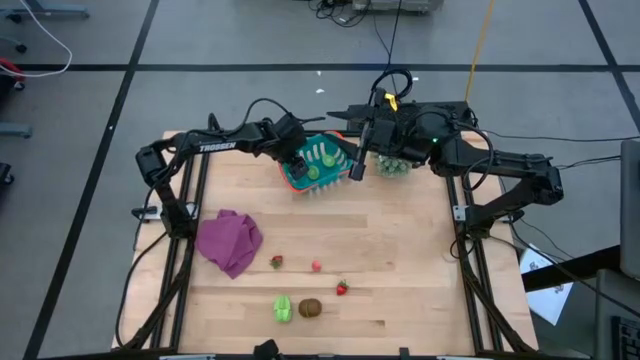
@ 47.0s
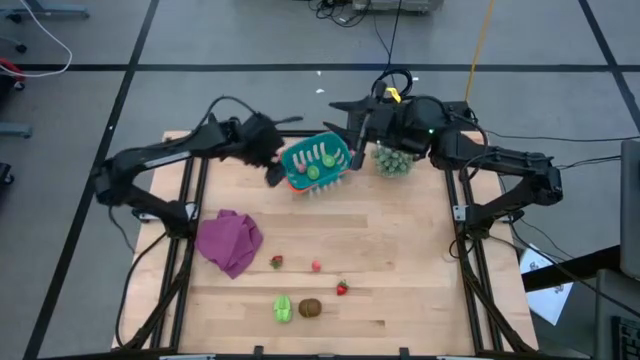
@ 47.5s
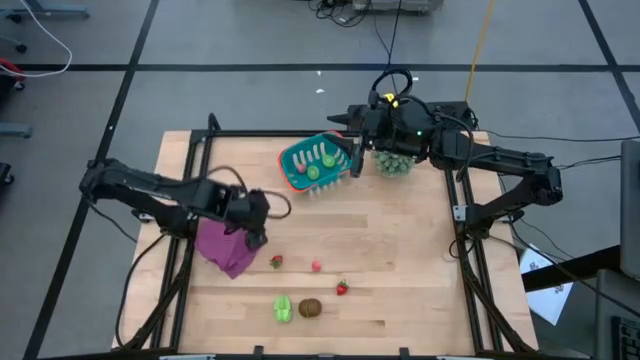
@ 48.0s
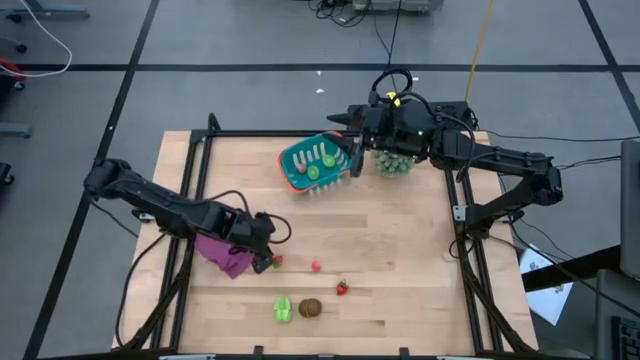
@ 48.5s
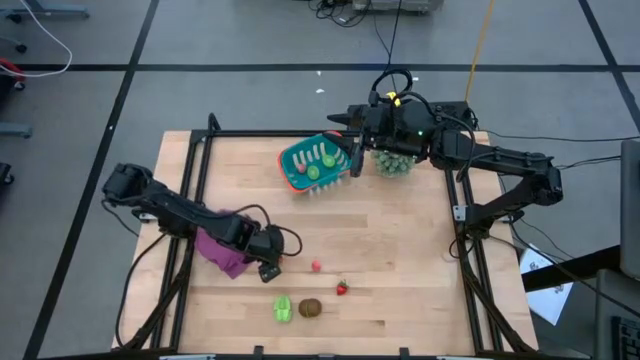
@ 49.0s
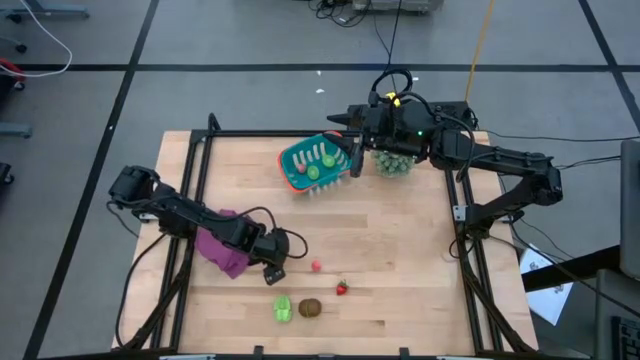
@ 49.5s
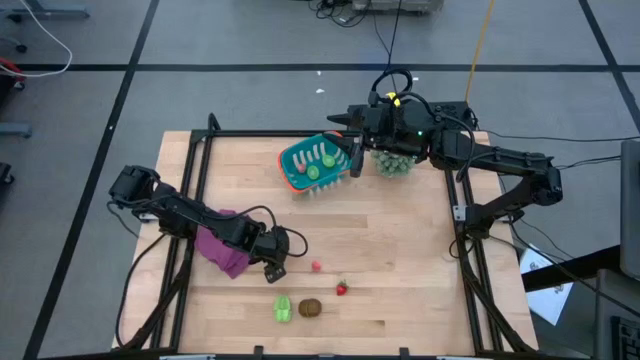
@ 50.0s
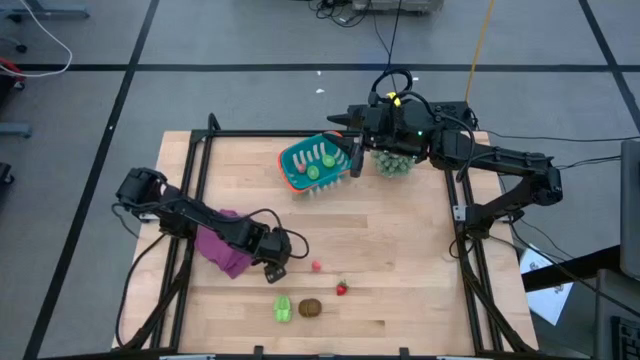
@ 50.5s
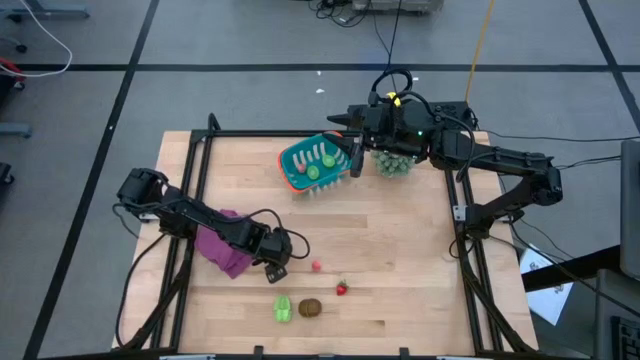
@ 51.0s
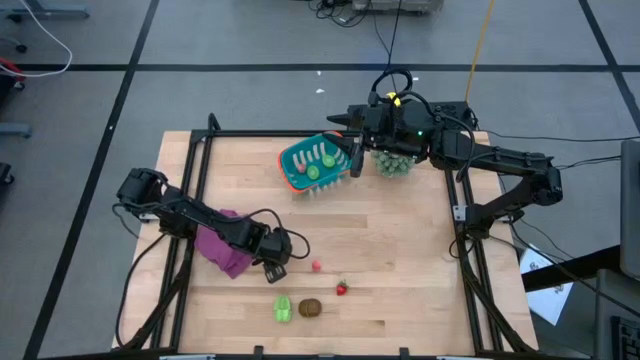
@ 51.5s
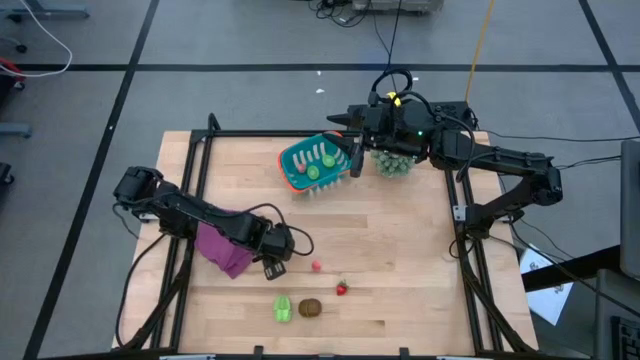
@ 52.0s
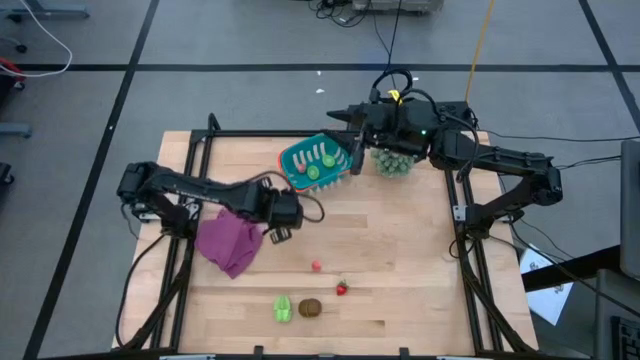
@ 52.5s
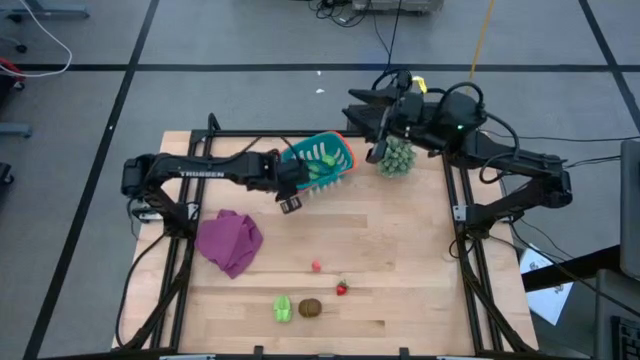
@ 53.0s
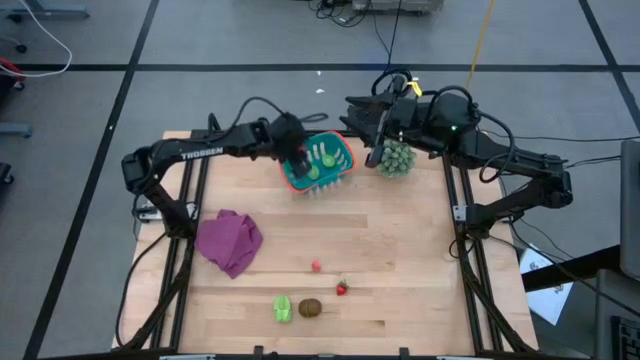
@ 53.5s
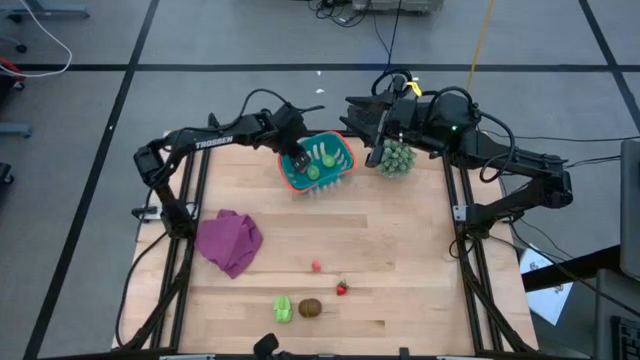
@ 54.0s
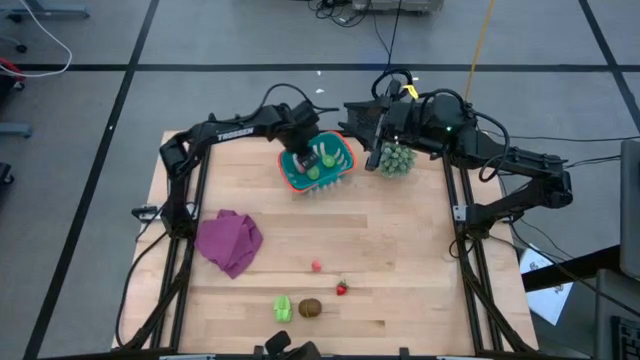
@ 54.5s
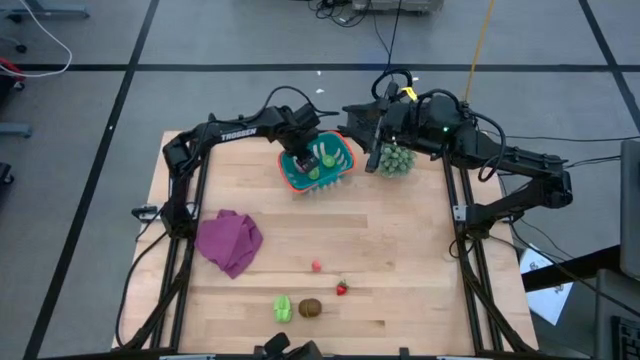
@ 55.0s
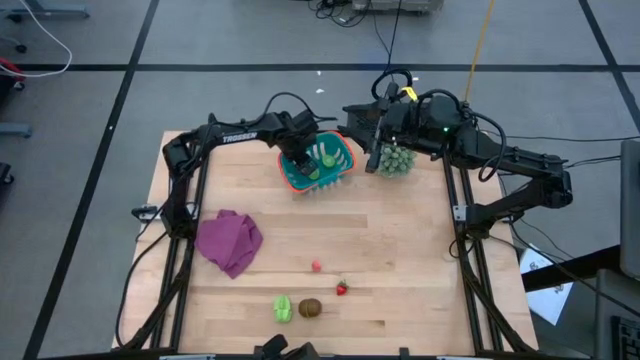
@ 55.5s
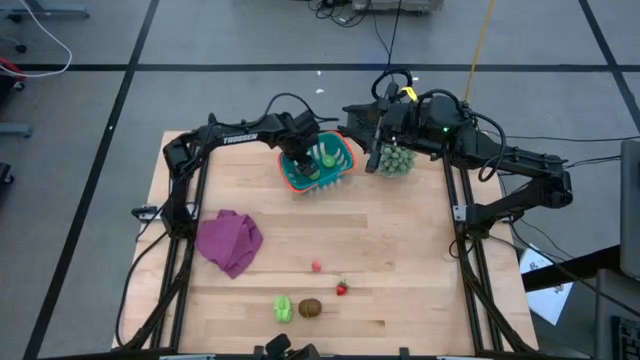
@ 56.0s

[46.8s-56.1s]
Task: Pick and placing Produce into tupperware
Put the left strawberry into the blue basket

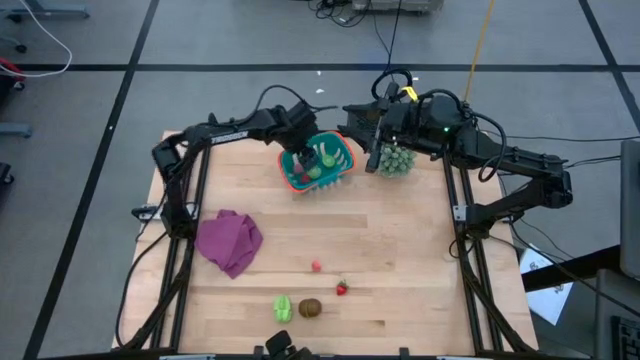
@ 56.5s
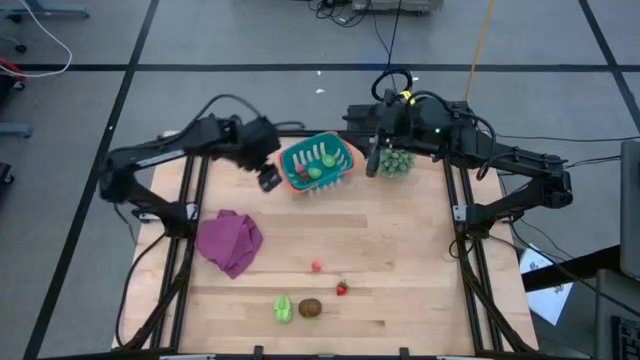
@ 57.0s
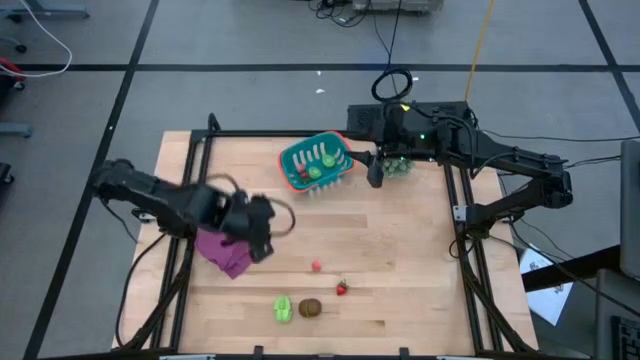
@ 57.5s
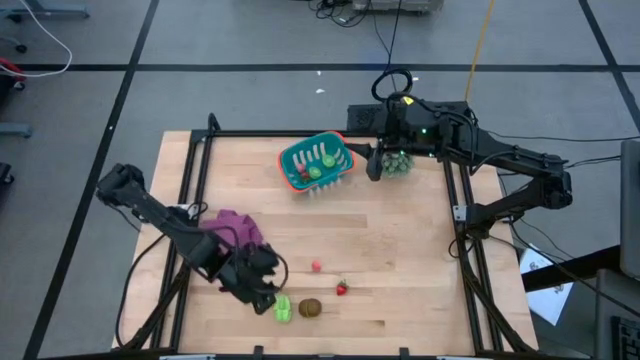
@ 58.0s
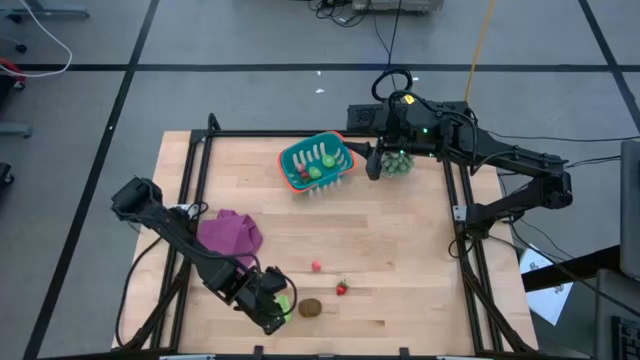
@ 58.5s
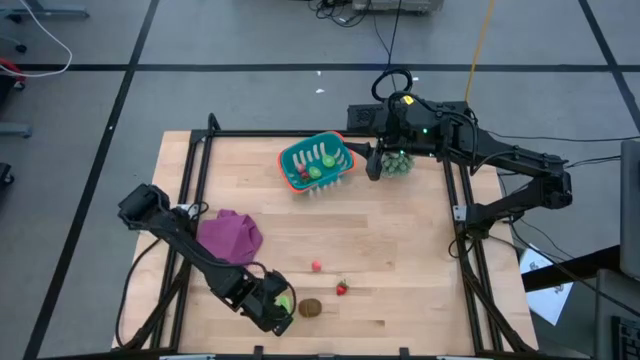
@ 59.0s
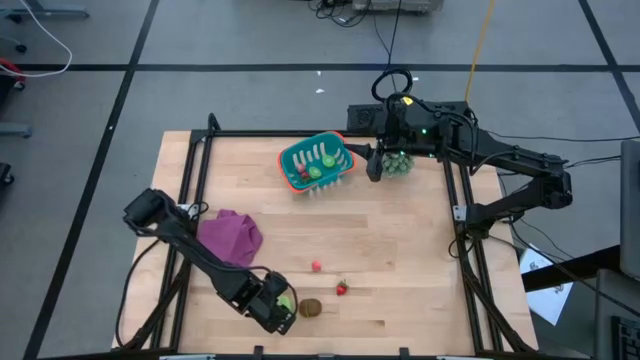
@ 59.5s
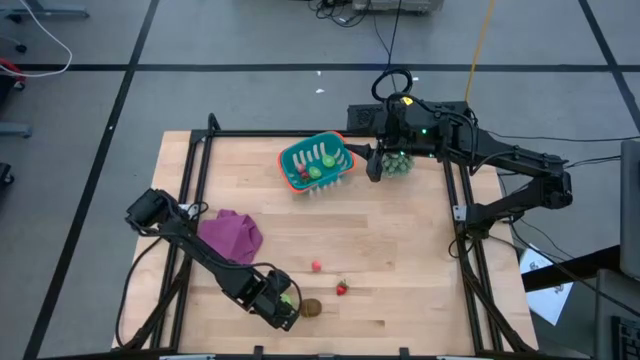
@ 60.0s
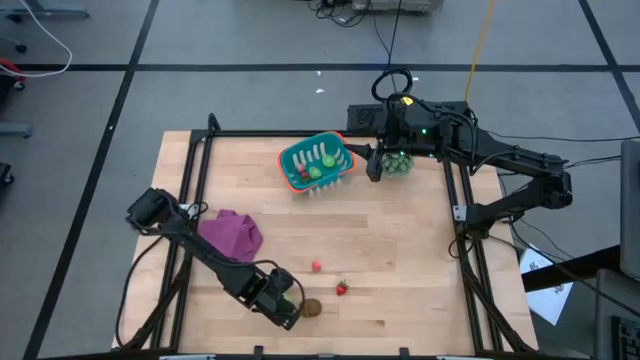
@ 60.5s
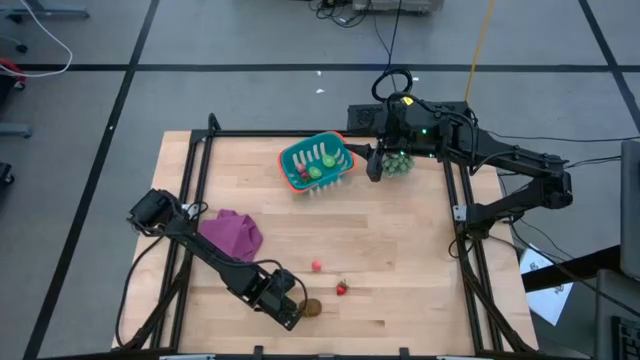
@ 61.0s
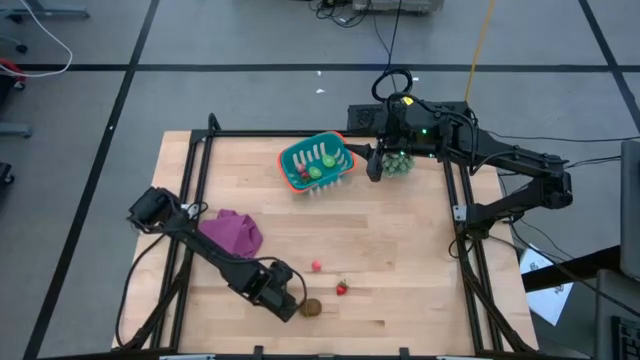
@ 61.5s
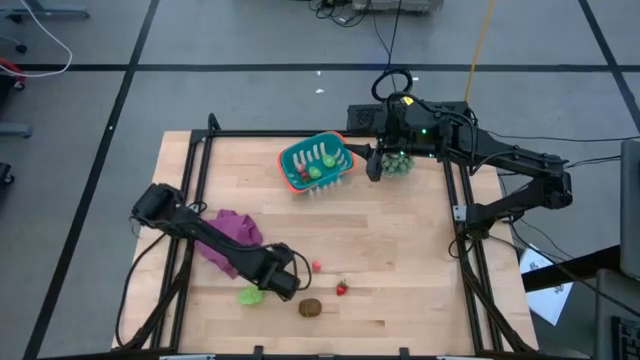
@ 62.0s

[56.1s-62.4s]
Put the star fruit into the blue basket

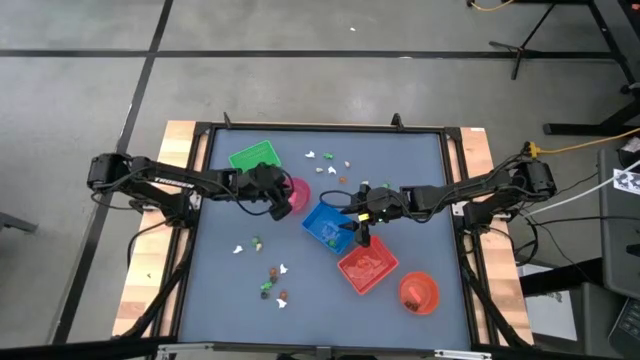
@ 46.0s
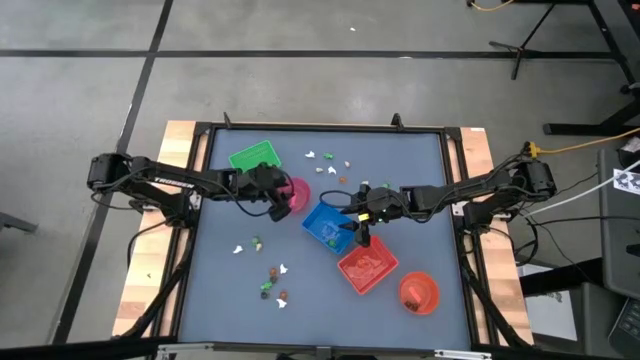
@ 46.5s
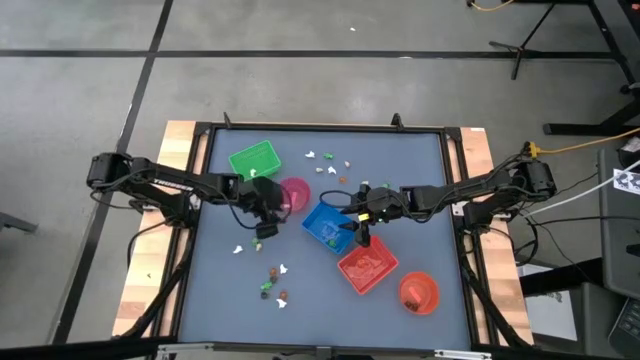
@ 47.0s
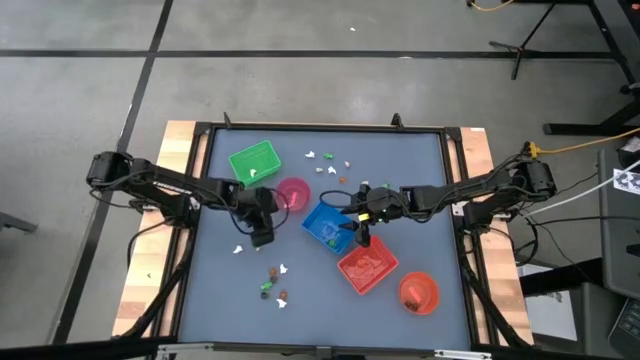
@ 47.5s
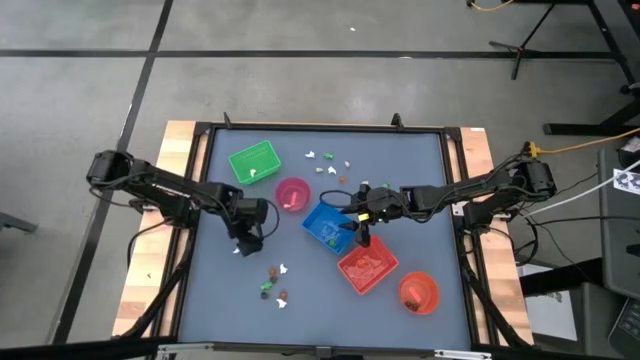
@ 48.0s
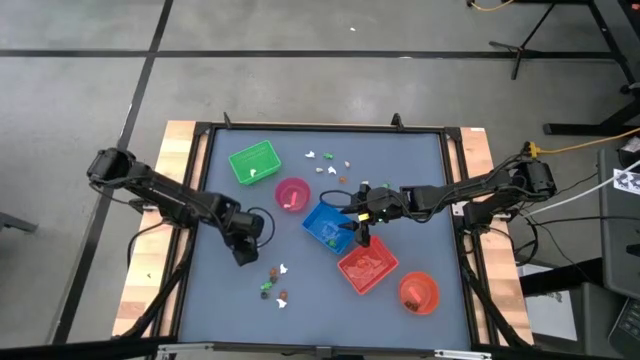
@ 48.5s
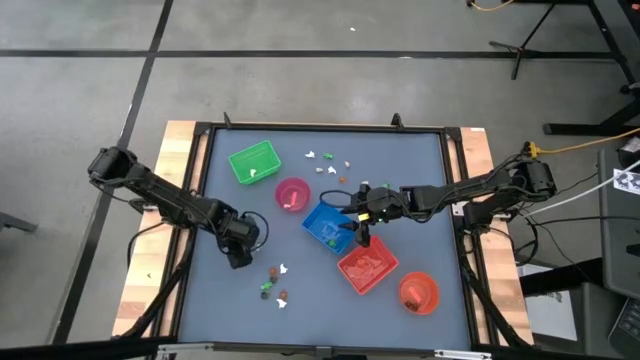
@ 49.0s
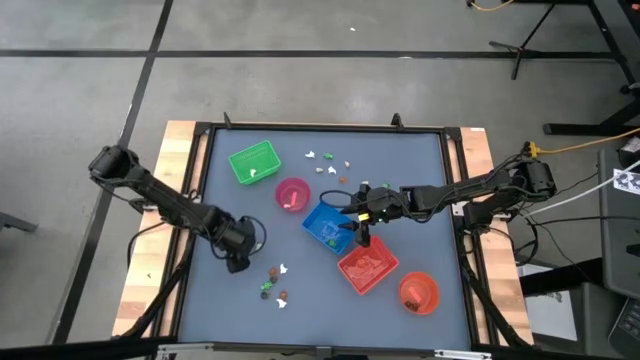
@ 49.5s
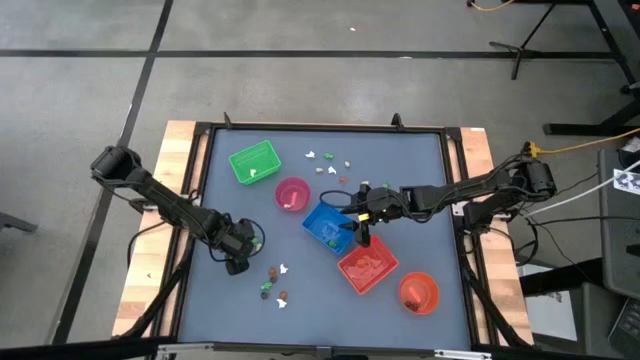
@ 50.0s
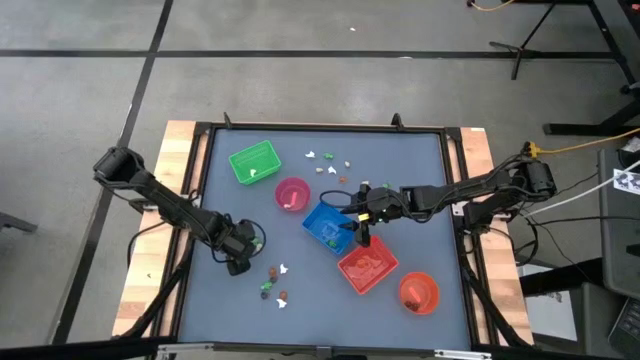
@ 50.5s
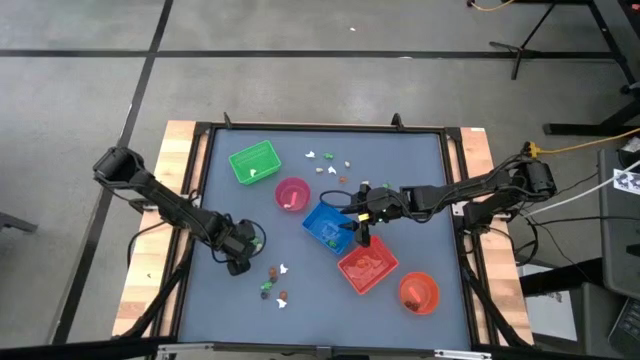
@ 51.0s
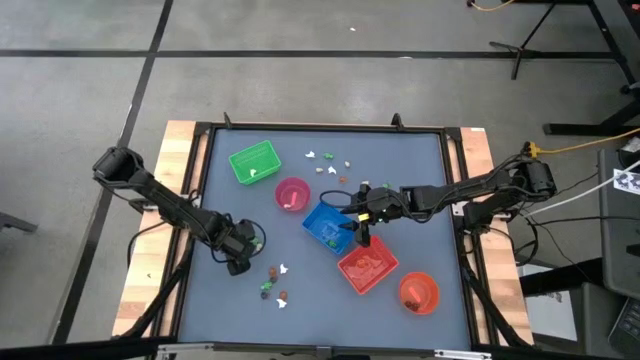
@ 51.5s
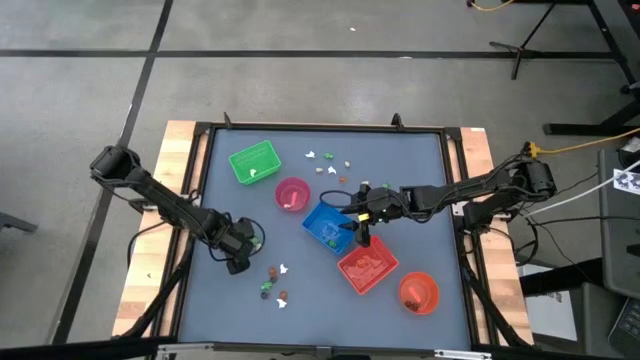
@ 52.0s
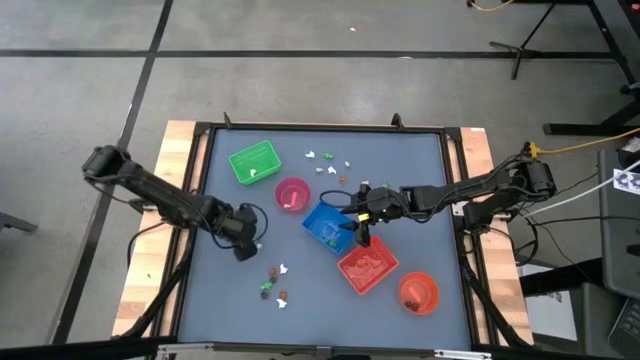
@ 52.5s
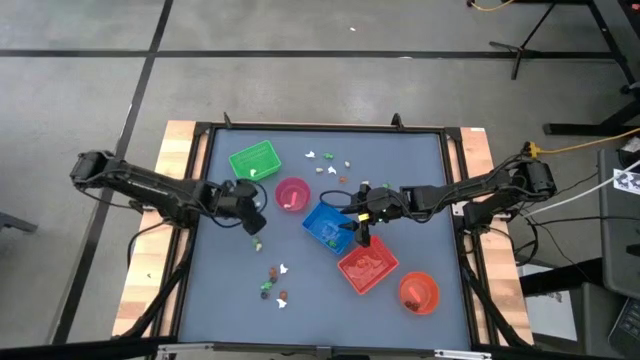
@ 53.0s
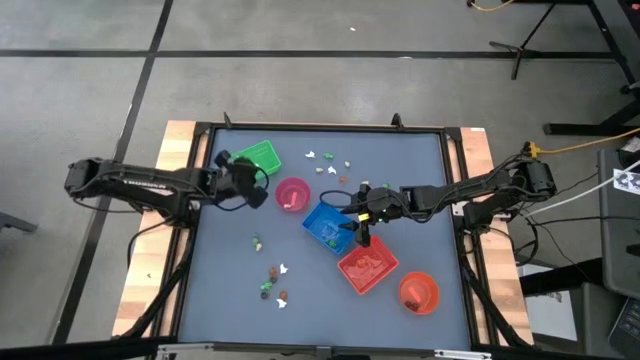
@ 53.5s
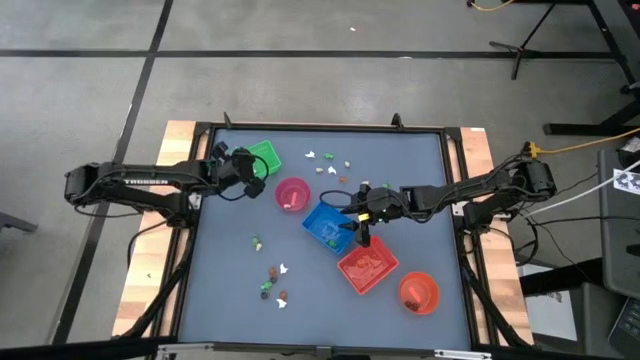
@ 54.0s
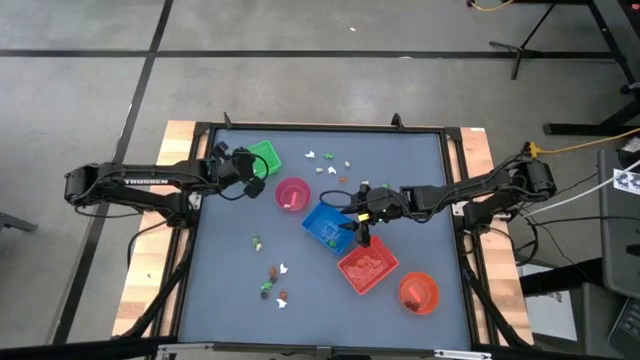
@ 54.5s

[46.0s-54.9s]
Task: Sort Halloween decoration
Put the white ghost toy into the green bin
